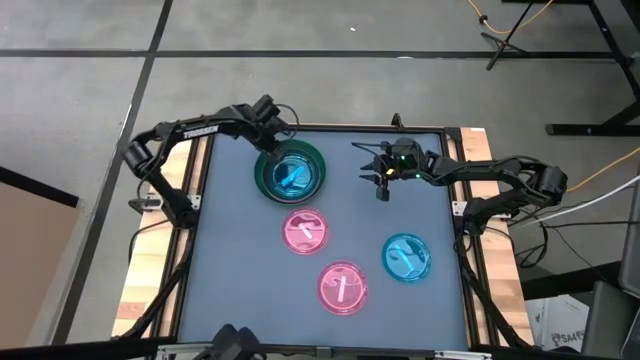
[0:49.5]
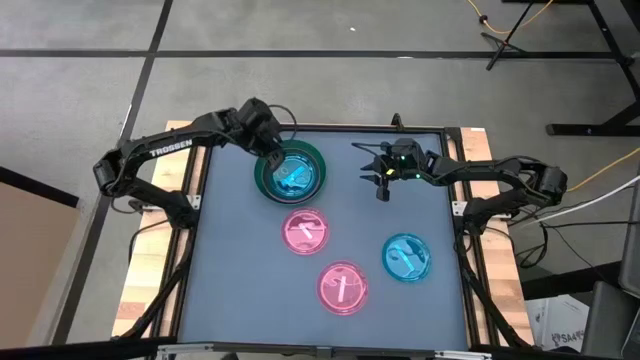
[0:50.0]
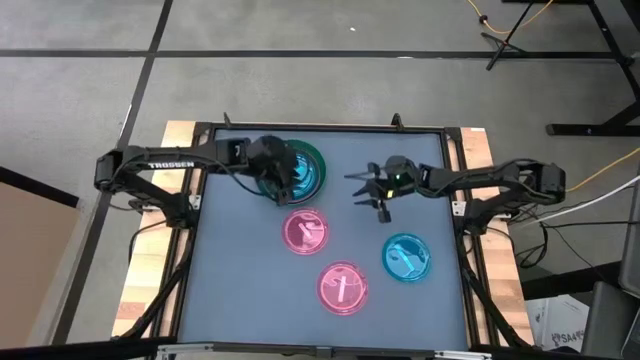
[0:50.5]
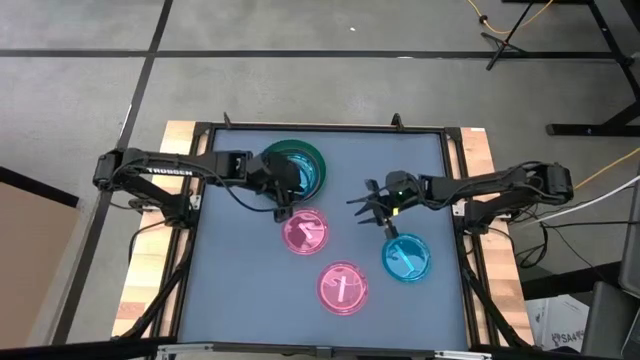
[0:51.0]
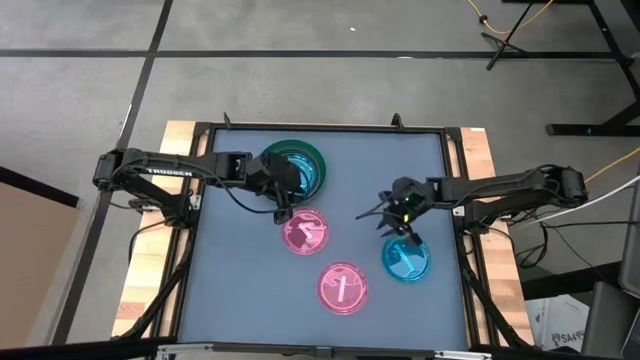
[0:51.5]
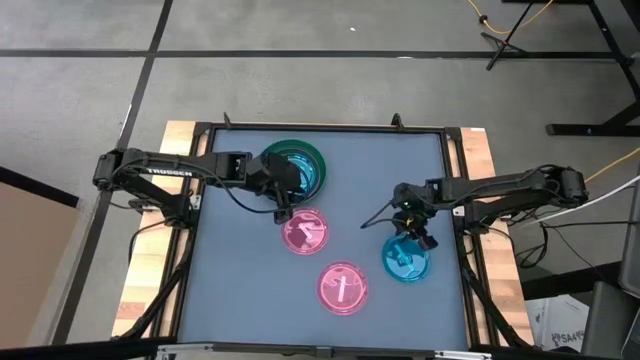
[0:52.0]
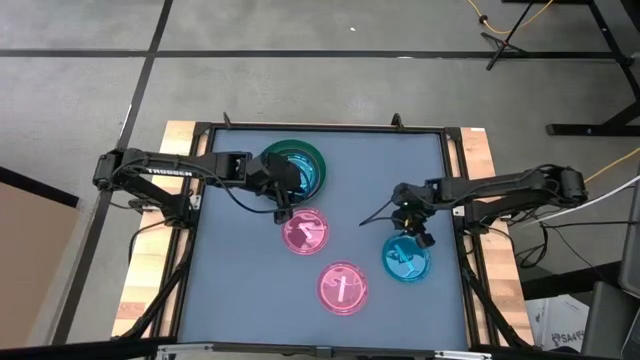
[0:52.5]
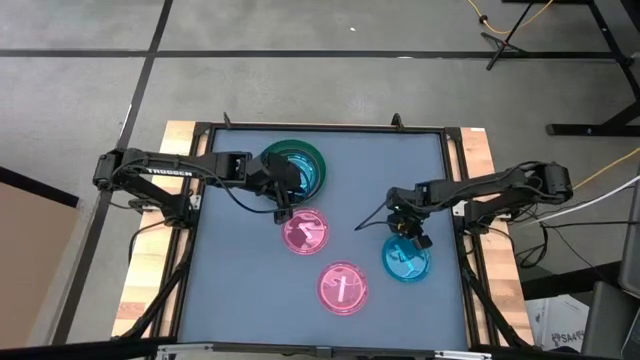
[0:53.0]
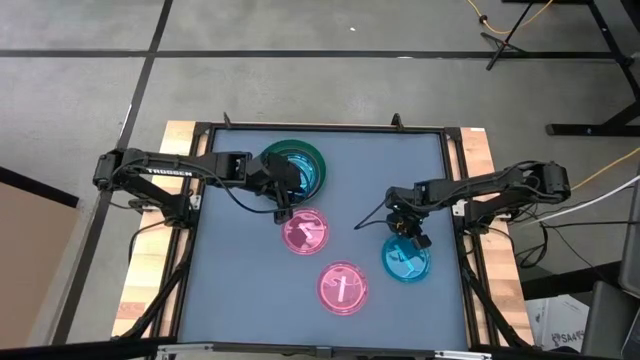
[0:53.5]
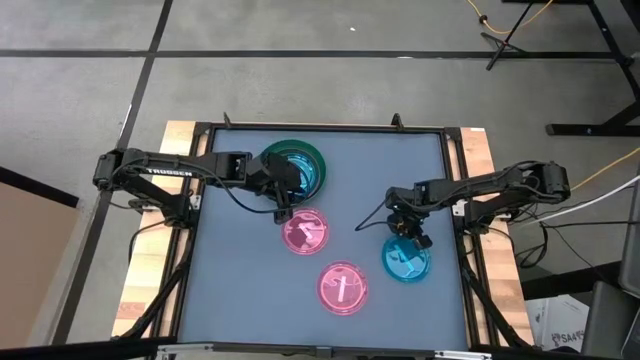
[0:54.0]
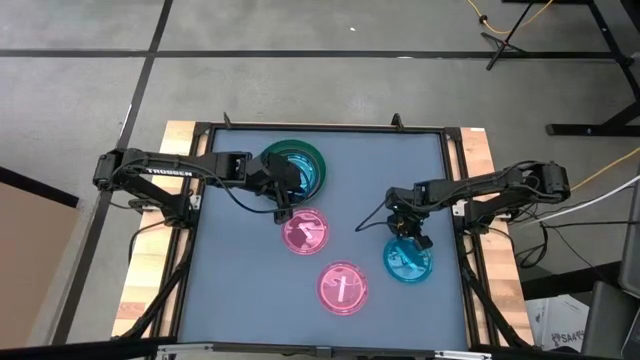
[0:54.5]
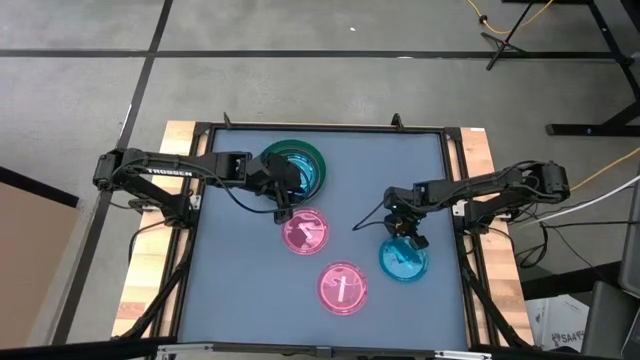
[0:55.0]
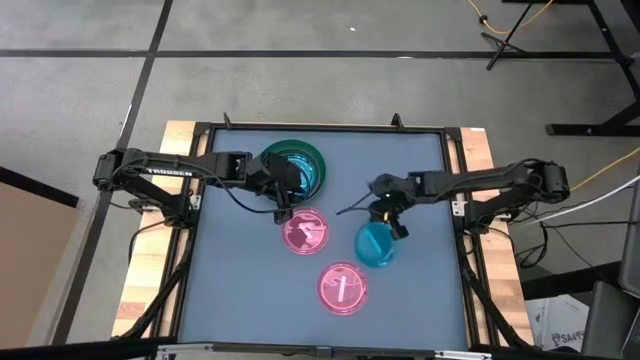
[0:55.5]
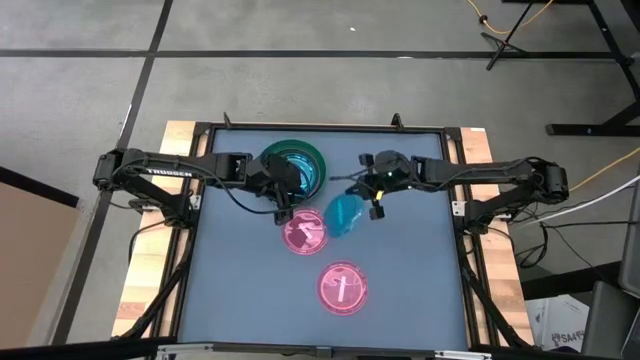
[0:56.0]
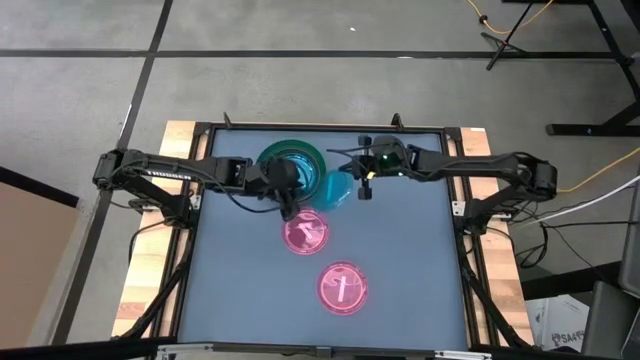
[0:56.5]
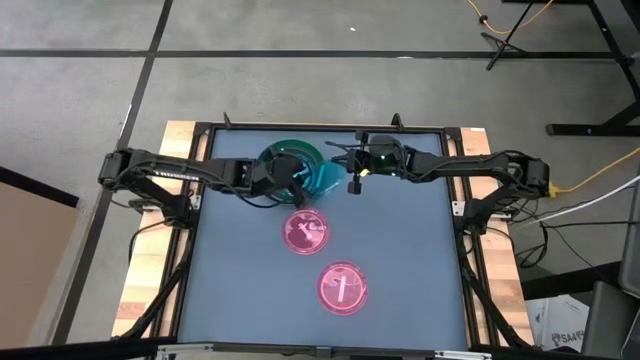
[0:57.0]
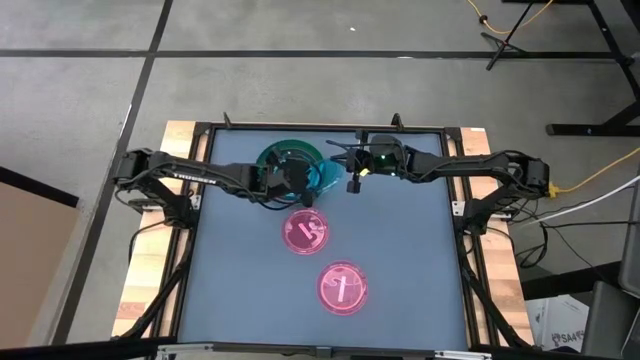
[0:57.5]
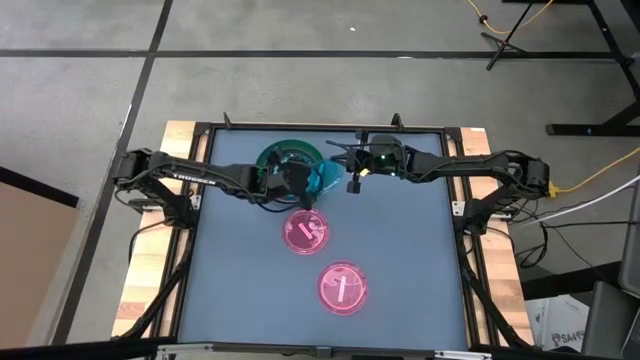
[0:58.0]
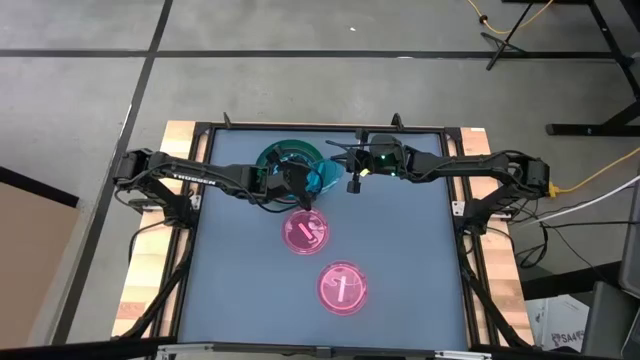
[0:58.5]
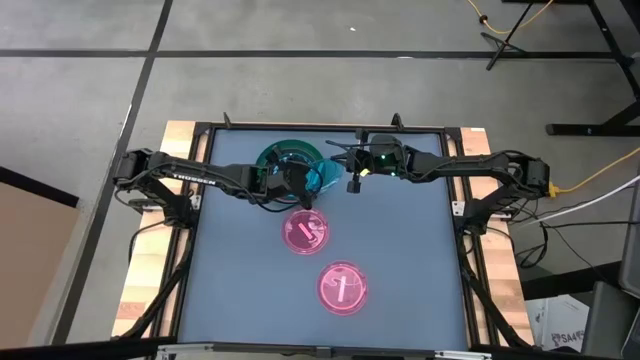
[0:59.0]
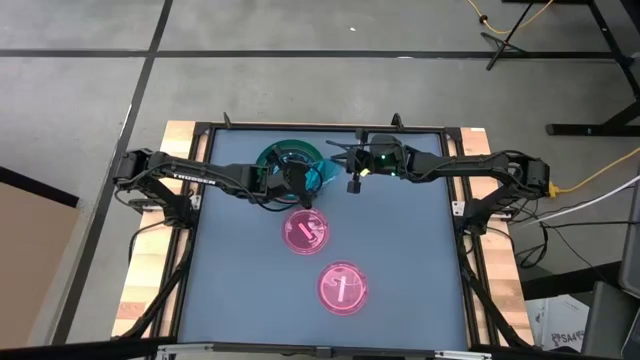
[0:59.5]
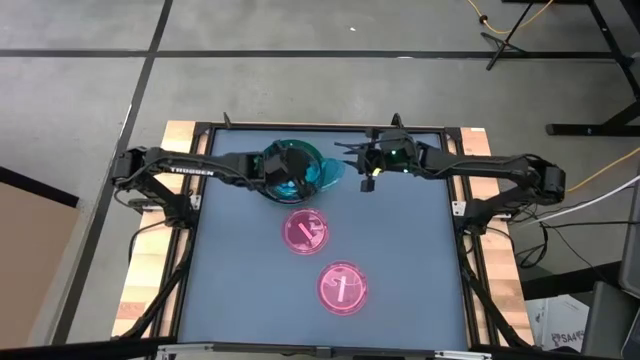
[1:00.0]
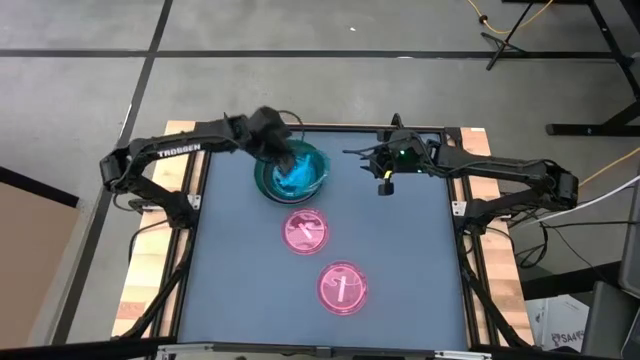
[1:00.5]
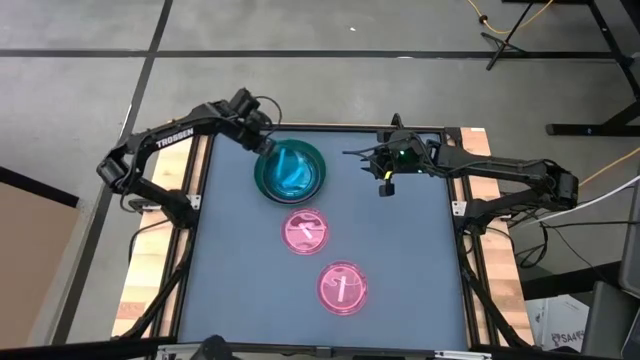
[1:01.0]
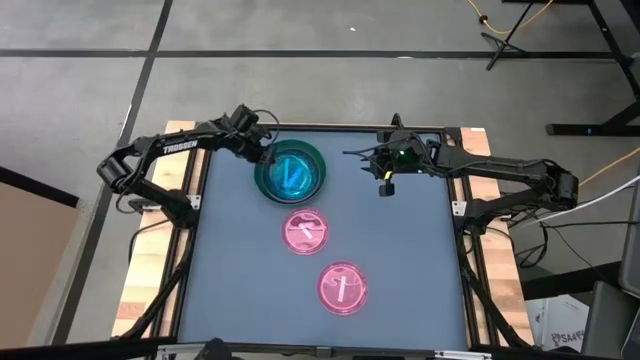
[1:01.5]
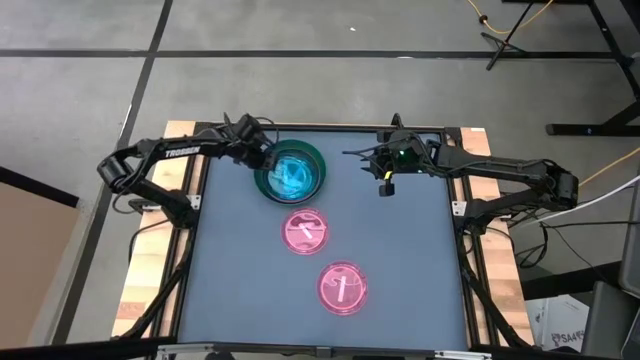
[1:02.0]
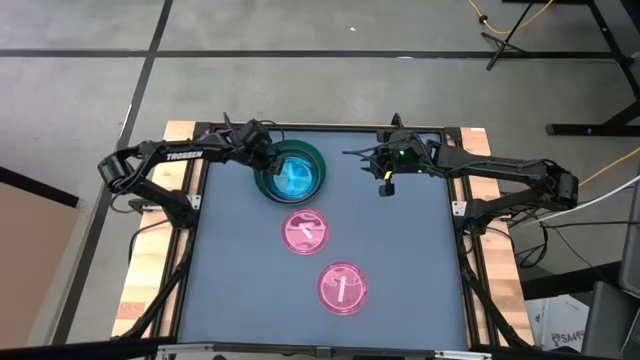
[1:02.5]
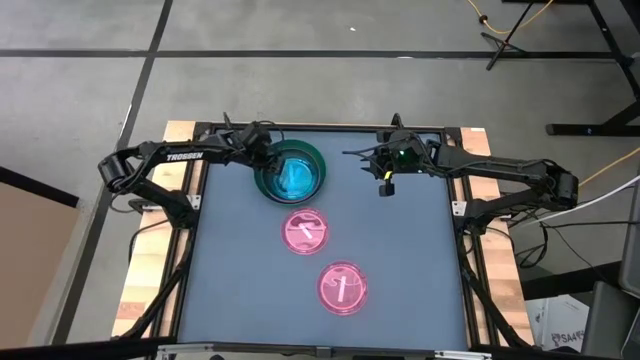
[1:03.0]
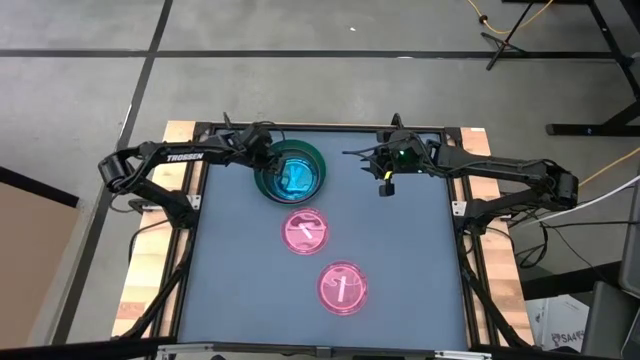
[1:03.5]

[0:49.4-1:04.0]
Task: Stack plastic plates
Stack the blue plate on the other blue plate

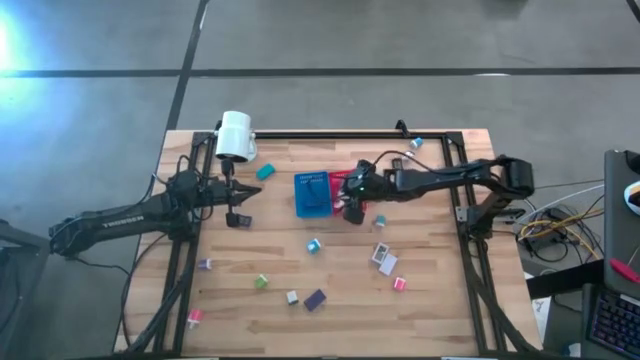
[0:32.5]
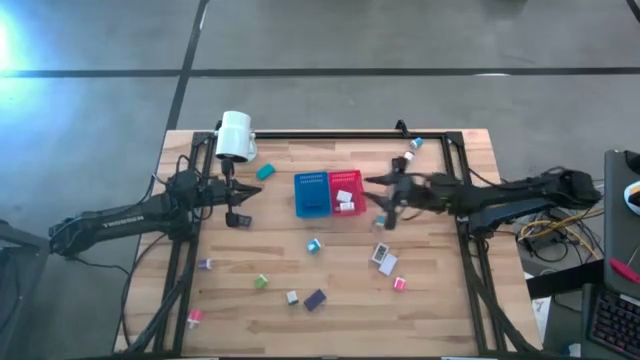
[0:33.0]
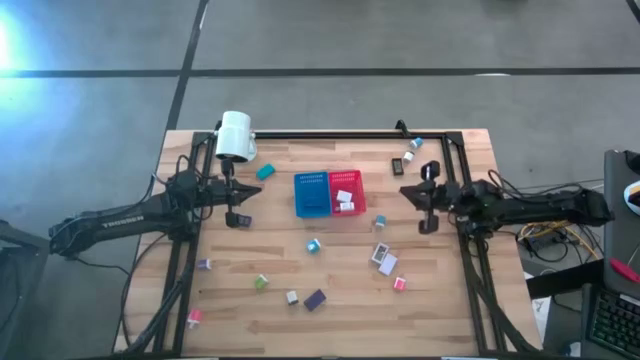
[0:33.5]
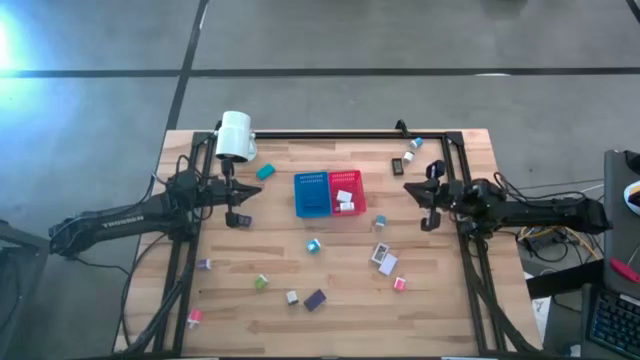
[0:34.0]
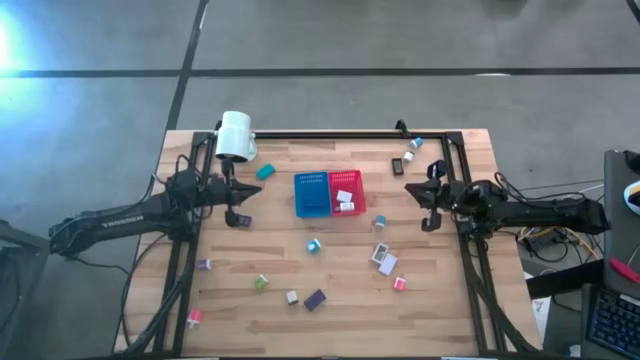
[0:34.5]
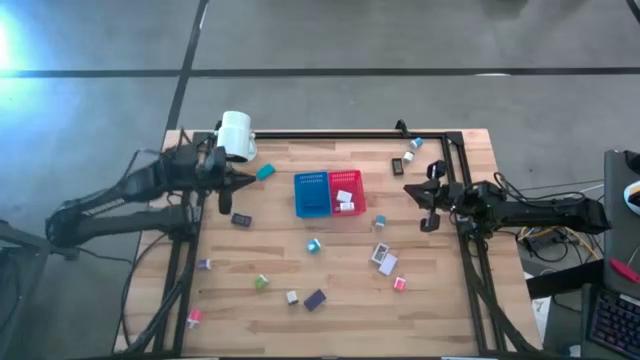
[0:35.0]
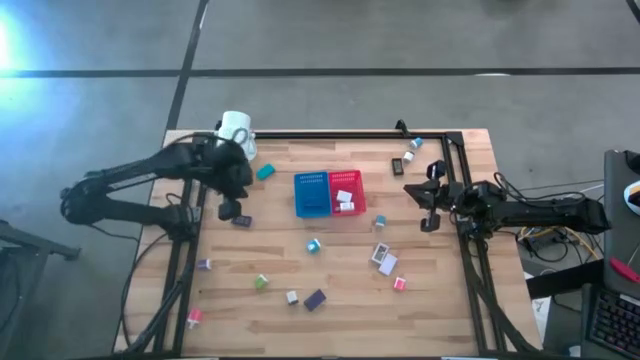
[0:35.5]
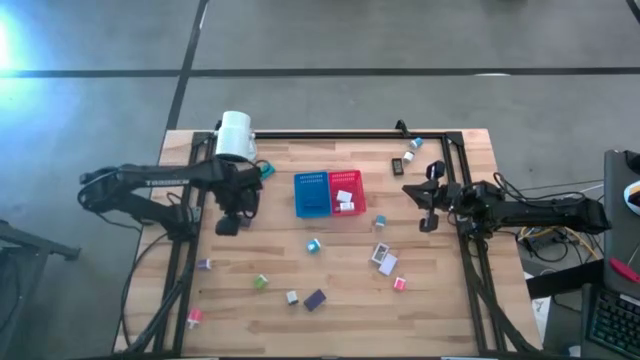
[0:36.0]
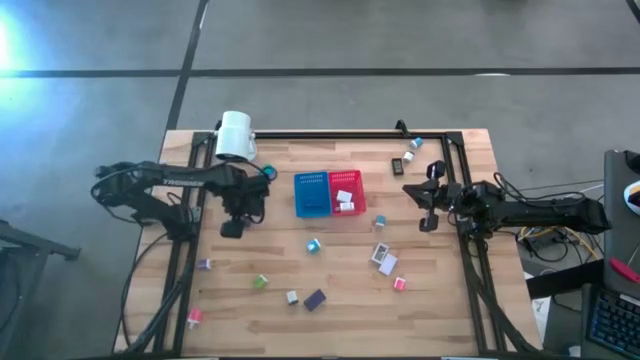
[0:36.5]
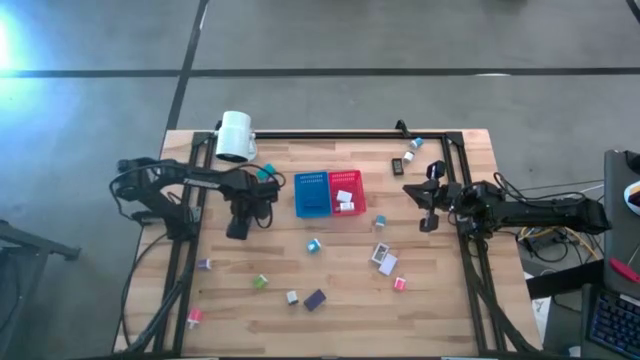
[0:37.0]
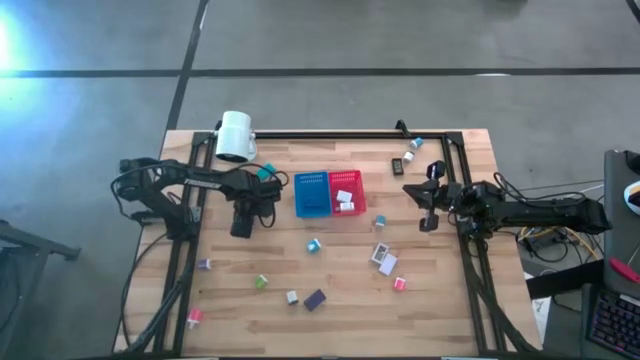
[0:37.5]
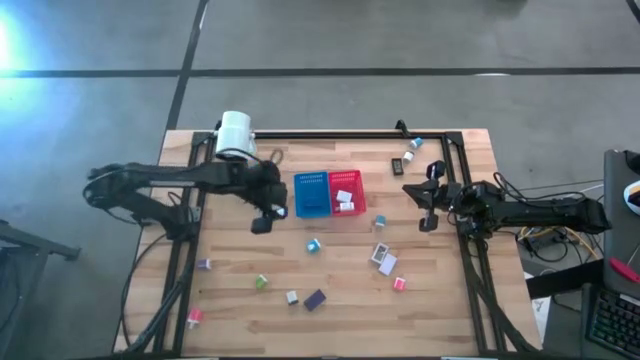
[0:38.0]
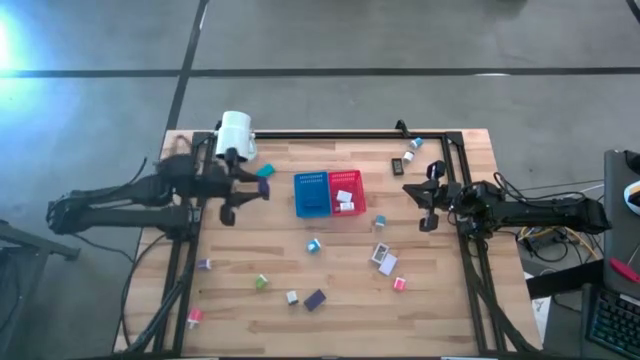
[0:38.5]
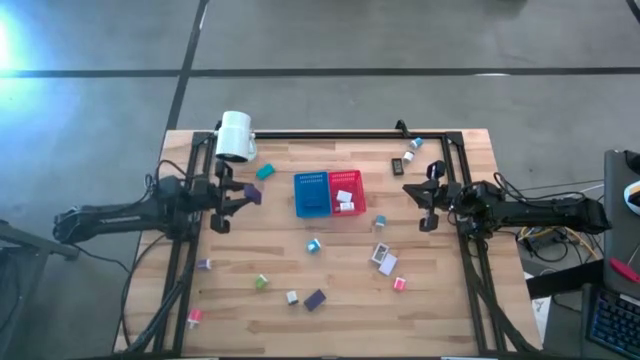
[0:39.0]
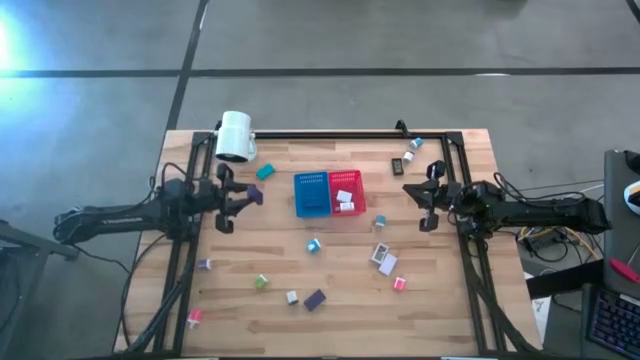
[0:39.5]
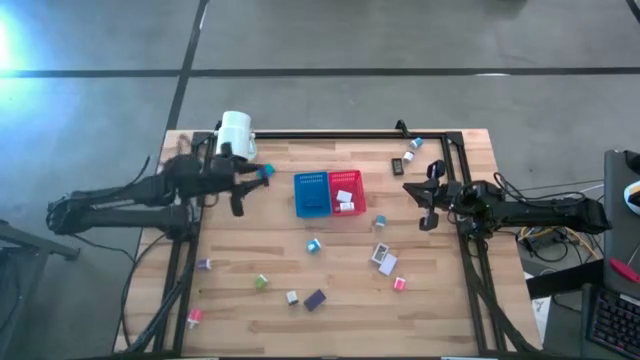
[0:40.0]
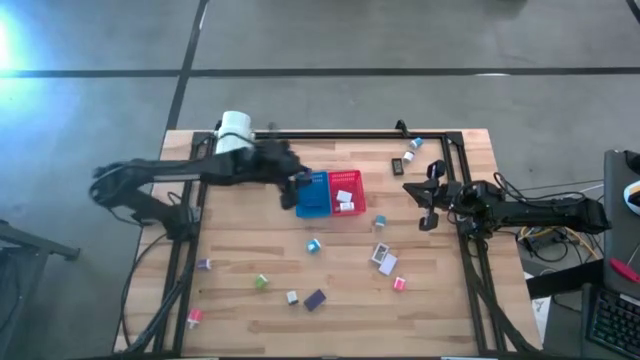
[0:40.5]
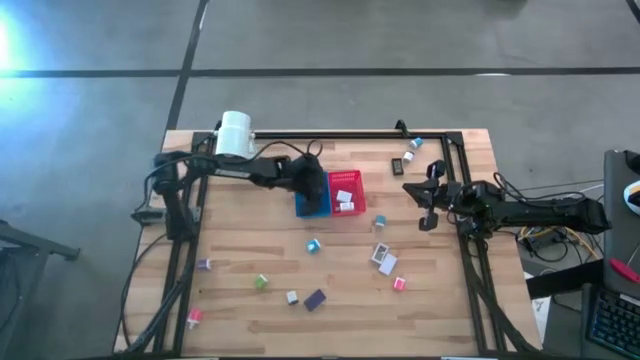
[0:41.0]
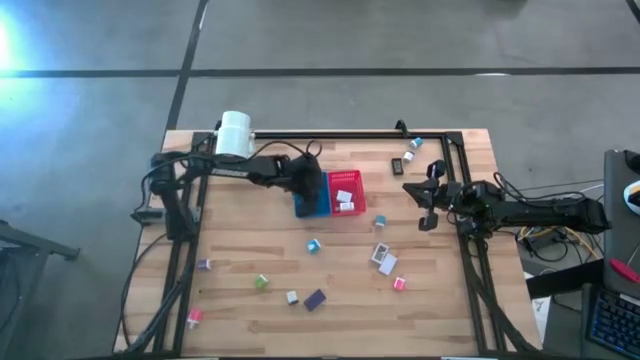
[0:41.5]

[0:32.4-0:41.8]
Task: Pick & Place Office items
Put the blue digital clock into the blue bin
